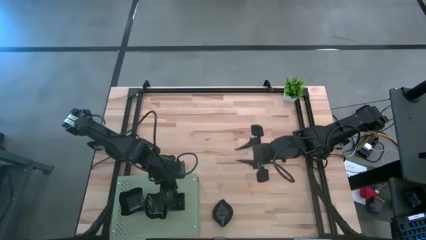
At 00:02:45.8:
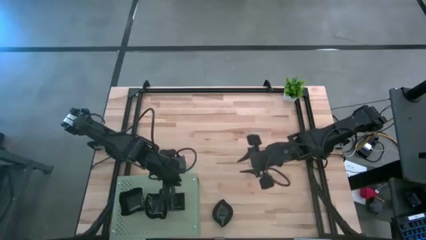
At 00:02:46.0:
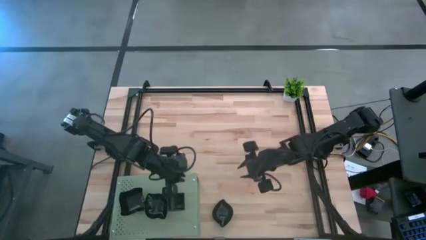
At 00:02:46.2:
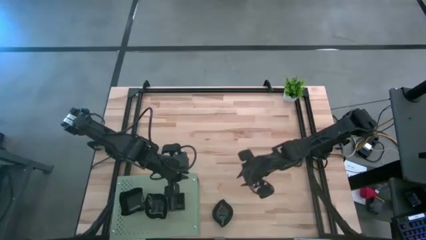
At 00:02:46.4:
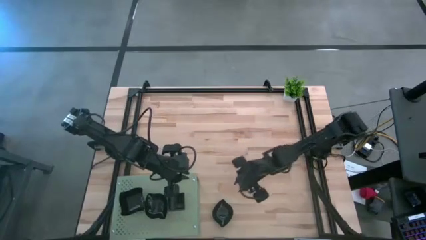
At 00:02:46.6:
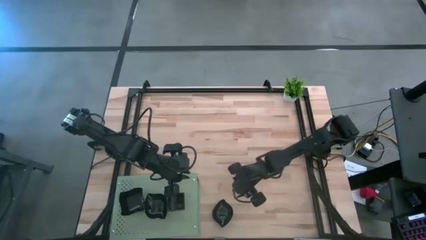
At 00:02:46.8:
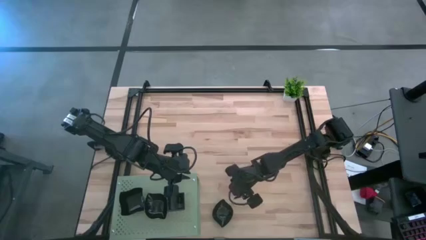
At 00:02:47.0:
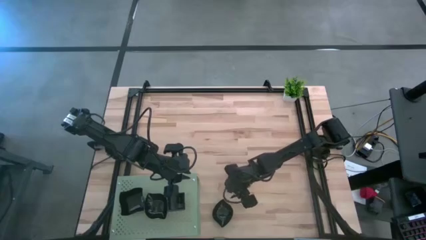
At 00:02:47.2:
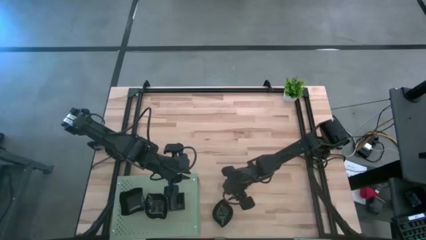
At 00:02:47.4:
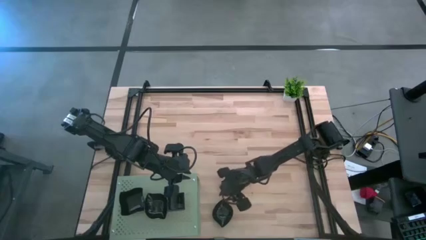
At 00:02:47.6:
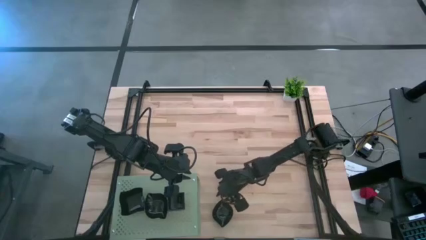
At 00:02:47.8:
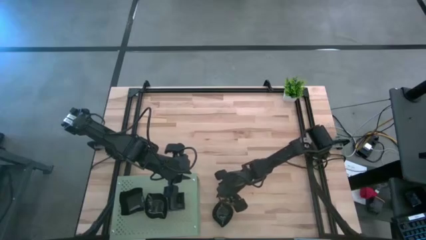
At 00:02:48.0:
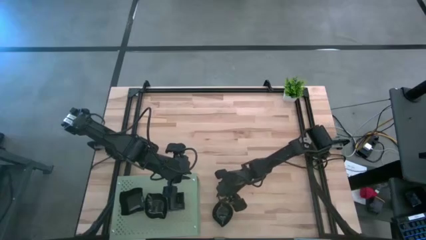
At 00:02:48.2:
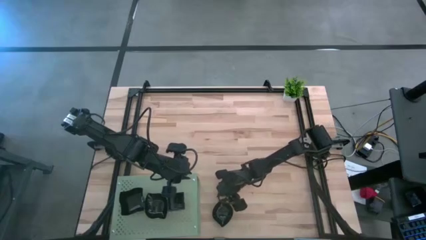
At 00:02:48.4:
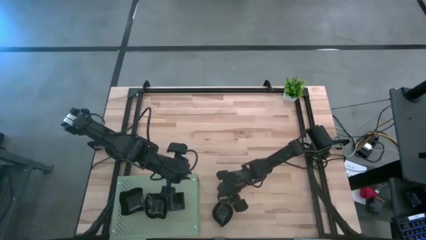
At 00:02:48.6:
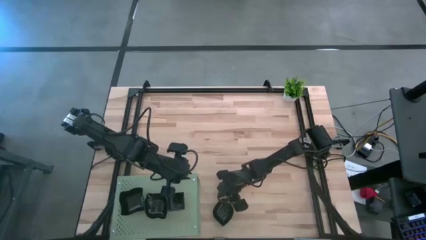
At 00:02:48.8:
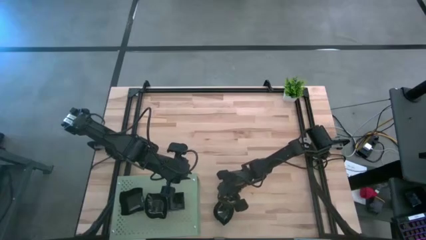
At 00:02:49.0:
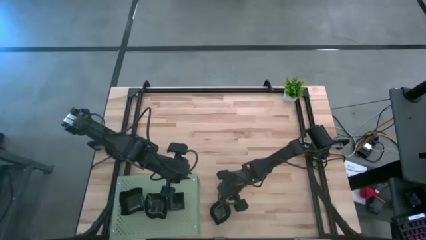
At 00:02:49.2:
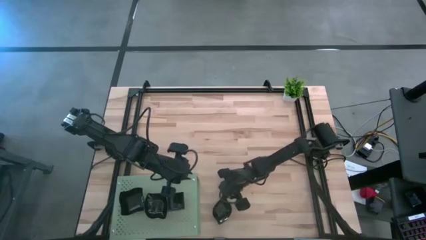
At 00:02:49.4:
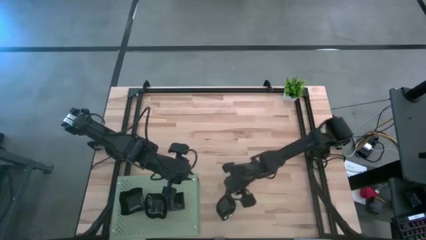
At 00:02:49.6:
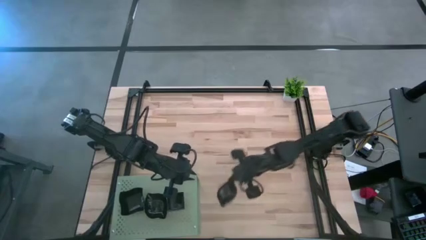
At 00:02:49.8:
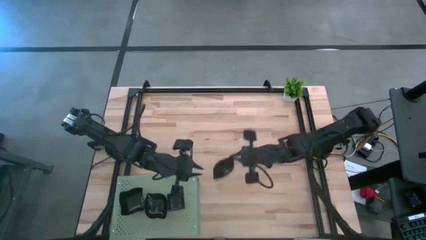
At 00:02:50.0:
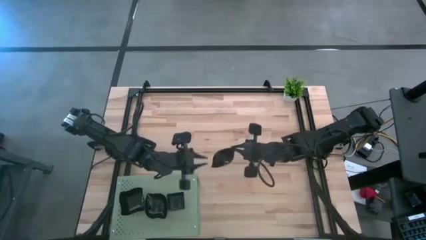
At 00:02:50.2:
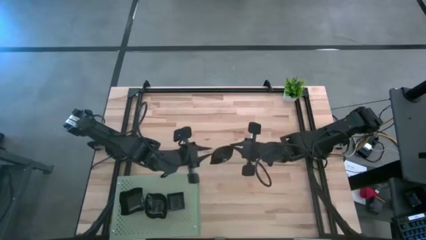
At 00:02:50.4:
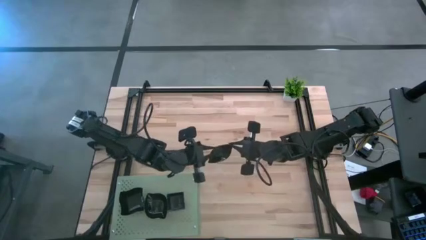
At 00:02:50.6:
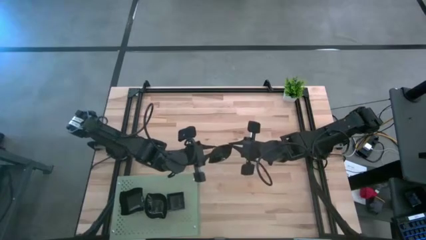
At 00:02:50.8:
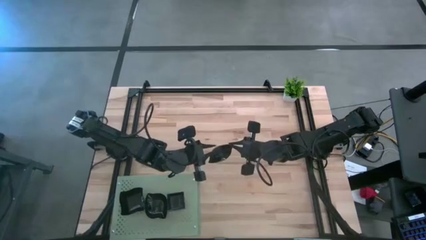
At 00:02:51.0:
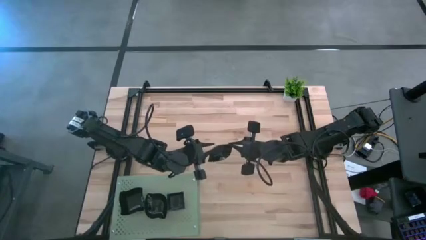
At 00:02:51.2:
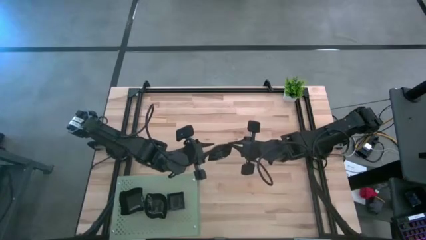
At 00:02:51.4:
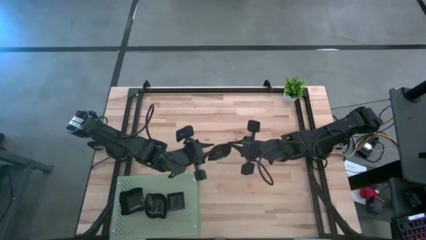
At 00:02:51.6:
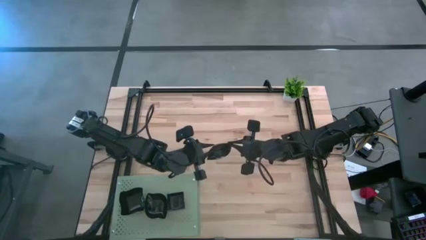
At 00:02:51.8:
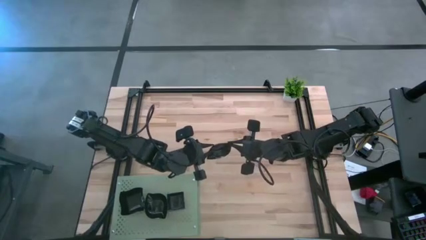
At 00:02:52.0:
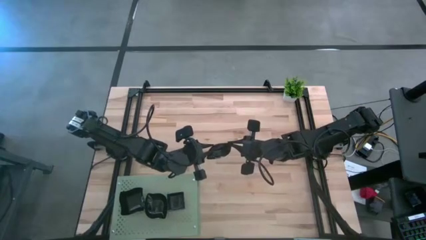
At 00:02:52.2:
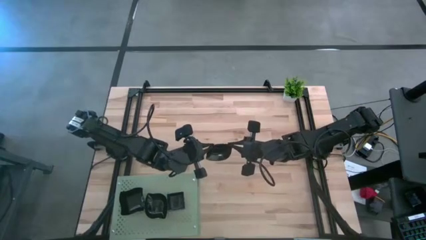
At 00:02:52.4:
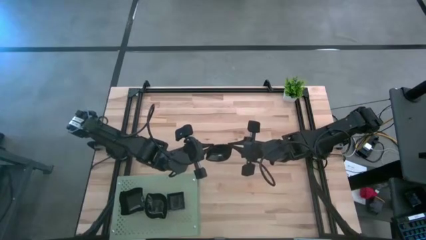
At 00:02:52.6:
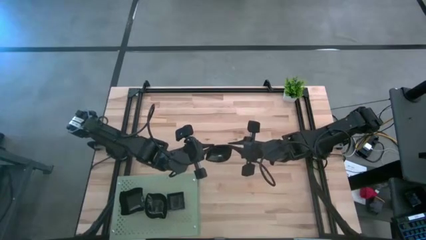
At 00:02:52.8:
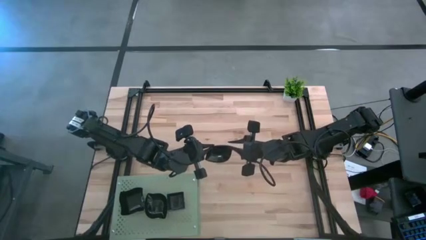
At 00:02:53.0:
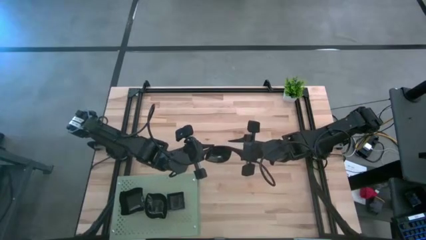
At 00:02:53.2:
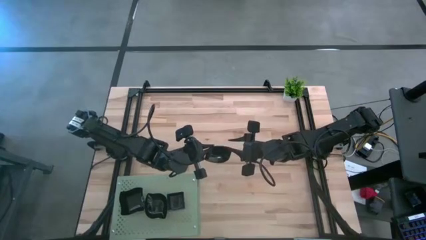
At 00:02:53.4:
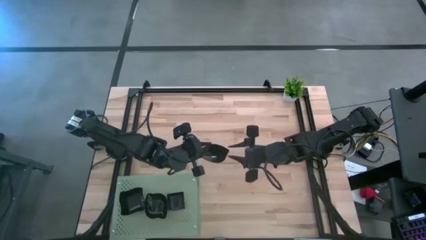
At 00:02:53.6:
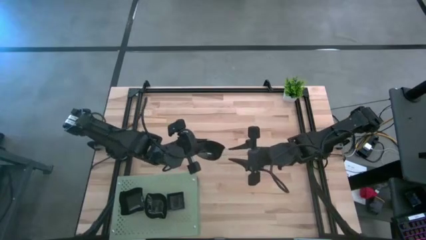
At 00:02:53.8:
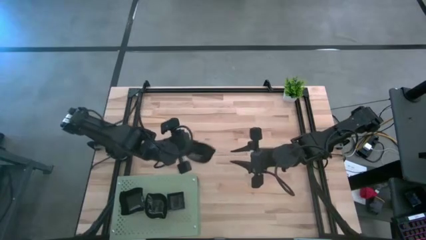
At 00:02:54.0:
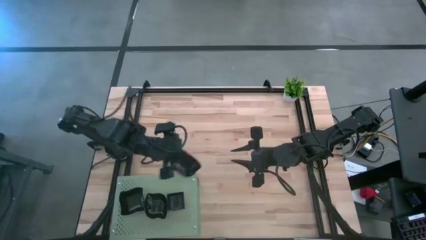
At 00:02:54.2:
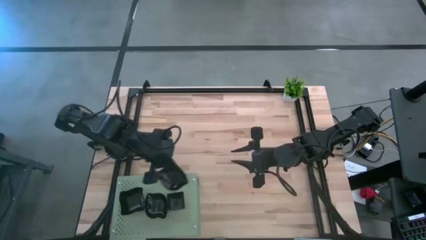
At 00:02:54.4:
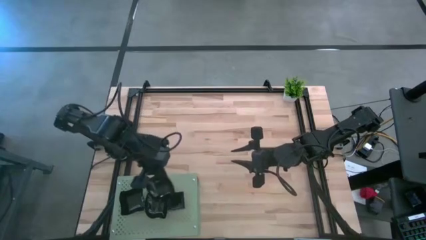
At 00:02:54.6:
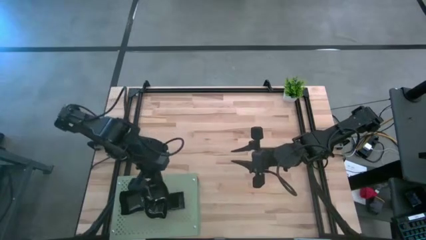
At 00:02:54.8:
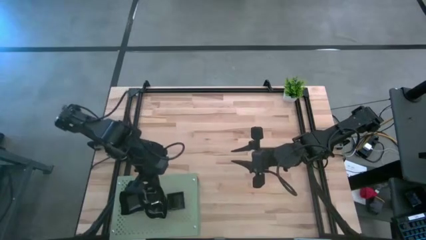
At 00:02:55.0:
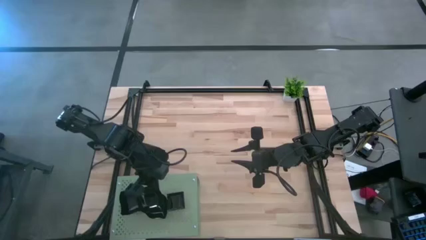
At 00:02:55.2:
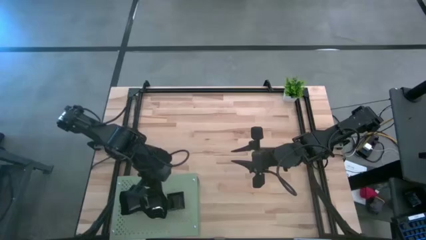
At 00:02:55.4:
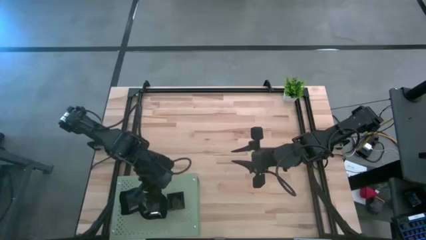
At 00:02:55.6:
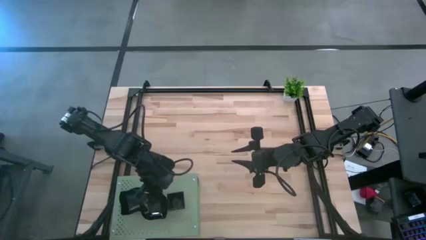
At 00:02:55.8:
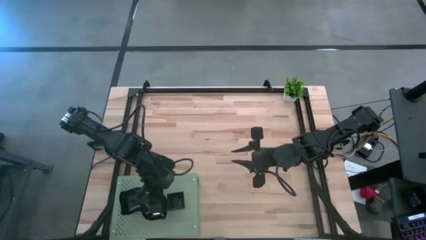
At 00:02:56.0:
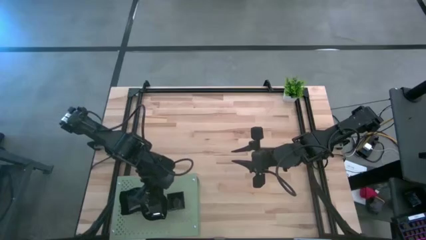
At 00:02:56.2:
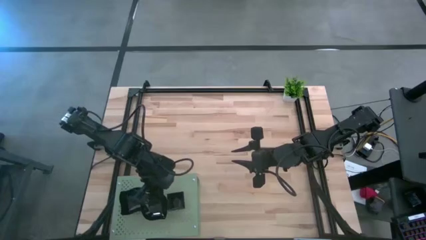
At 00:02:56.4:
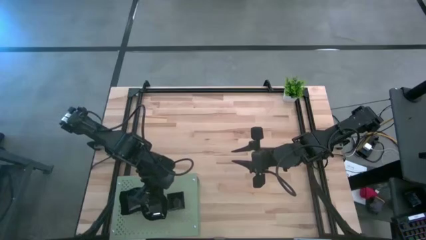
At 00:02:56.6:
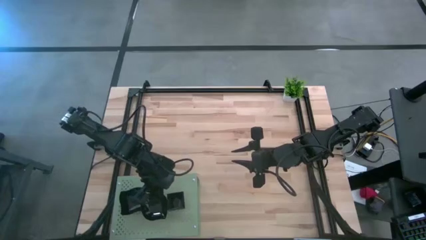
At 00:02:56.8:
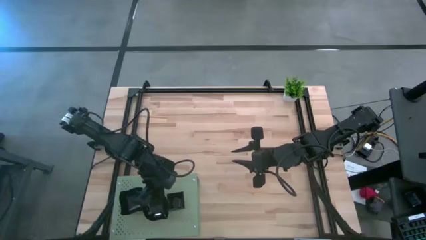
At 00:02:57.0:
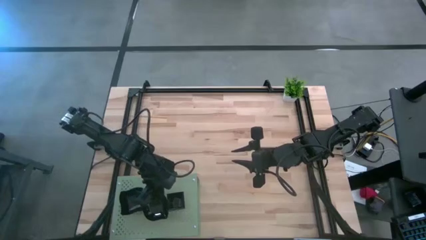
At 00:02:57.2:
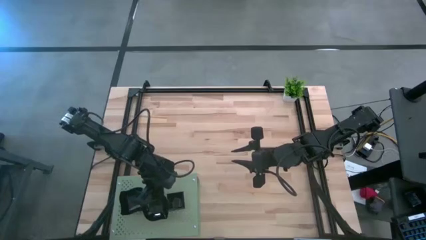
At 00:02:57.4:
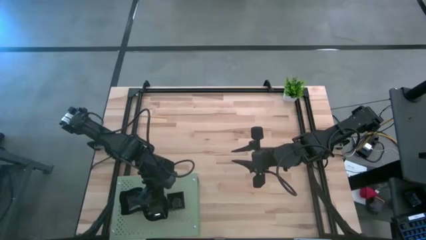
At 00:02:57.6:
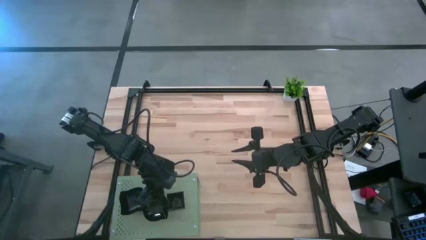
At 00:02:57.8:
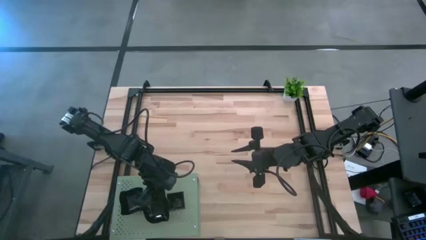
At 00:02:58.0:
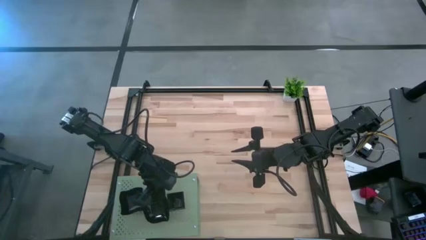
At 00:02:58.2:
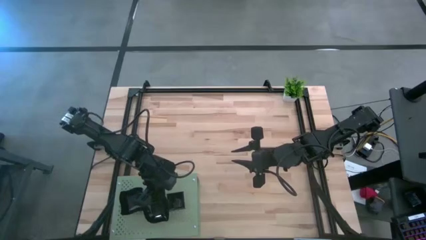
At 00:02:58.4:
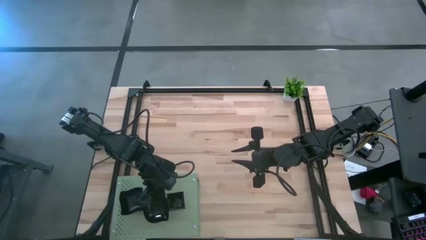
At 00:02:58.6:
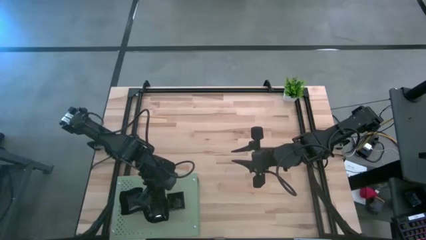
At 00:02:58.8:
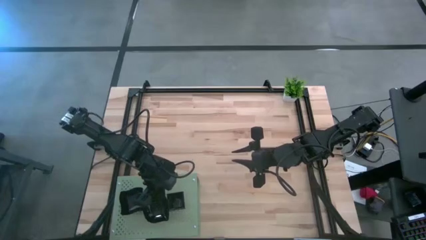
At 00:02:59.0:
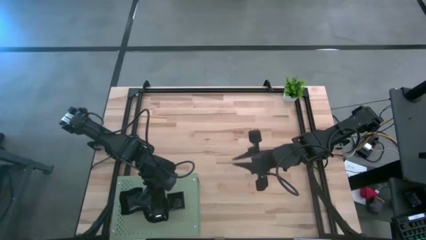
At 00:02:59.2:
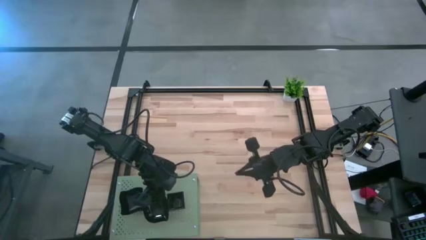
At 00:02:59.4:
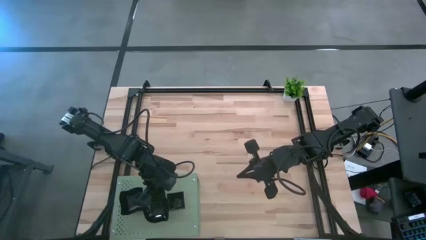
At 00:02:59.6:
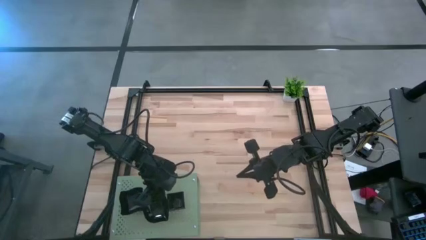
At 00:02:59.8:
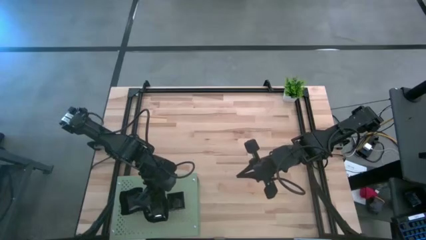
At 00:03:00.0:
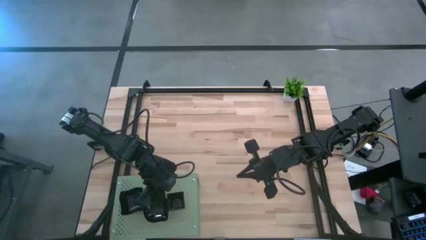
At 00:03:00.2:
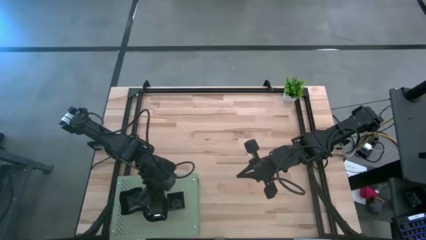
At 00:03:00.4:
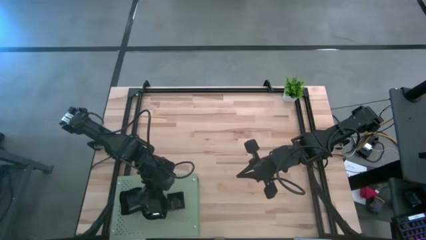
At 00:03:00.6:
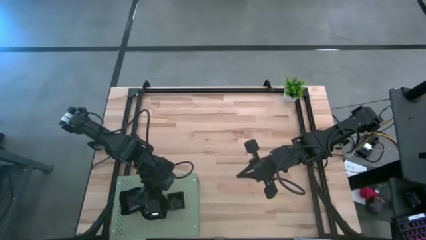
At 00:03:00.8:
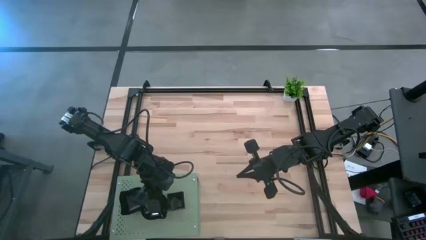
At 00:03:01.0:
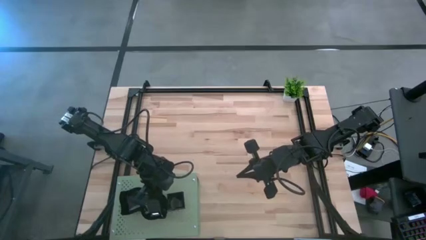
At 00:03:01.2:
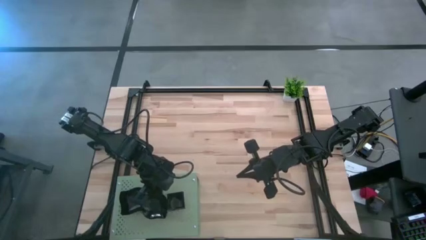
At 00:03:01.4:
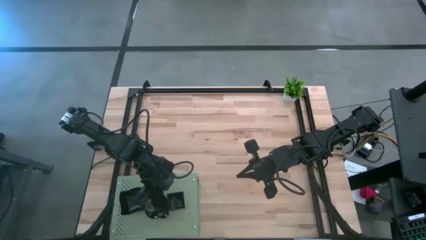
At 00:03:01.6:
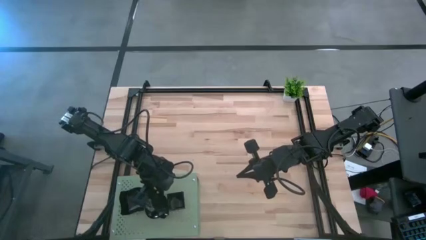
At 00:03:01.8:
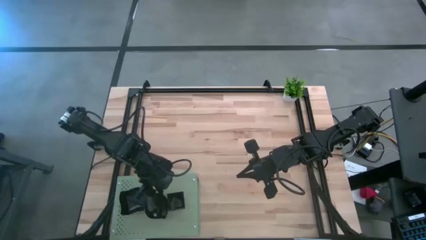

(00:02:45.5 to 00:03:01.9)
Task: Pick & Place Mini shaped plates
Stack the black leaf shaped plate on top of the other black leaf shaped plate on the shelf

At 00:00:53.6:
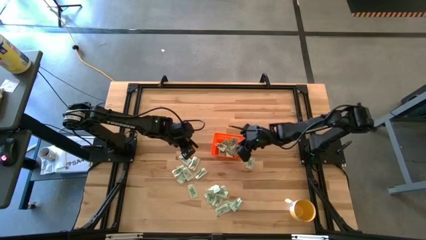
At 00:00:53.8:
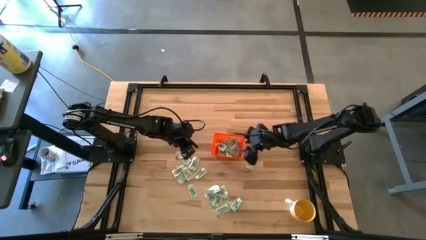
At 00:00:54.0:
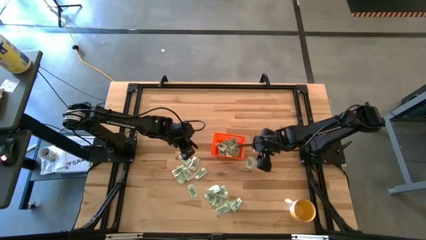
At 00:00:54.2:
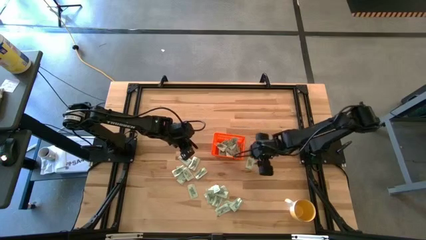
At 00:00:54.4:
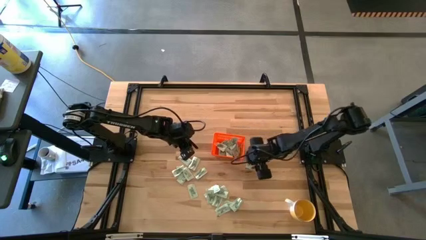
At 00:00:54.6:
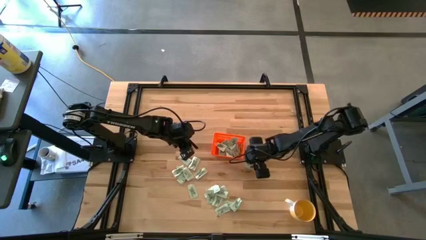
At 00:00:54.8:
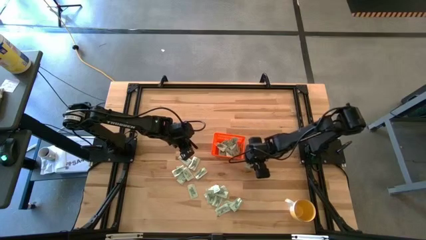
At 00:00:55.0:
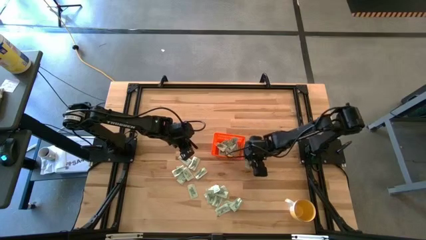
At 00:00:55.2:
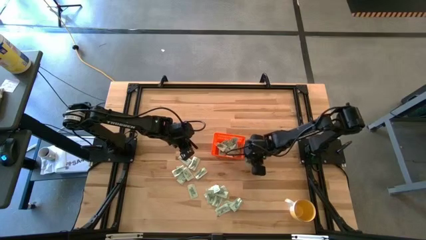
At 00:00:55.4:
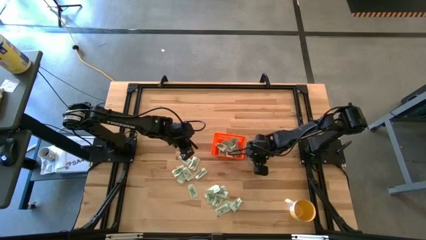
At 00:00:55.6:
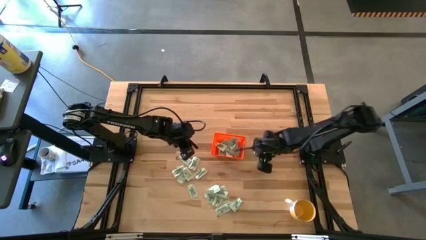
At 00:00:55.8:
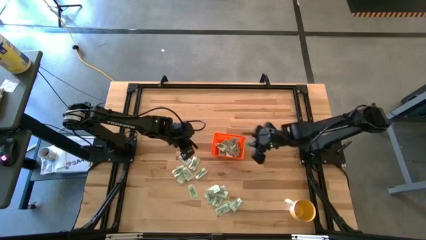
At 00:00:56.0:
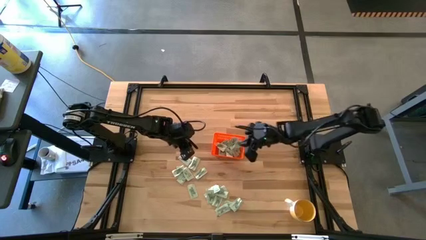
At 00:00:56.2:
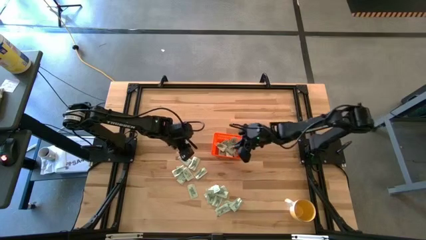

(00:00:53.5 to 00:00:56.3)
Task: Pick and place Stevia / Truvia into bins
Put the white stevia packet into the orange bin
